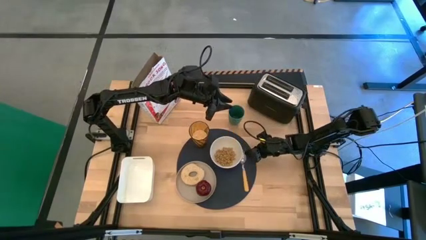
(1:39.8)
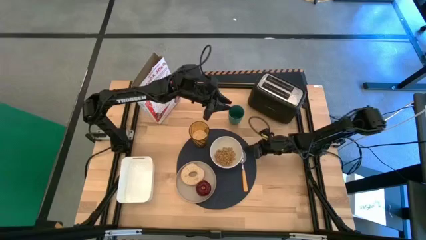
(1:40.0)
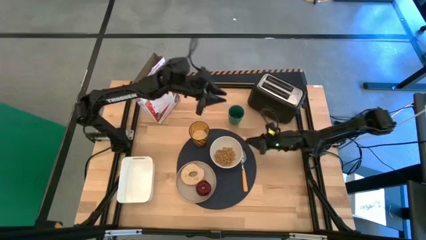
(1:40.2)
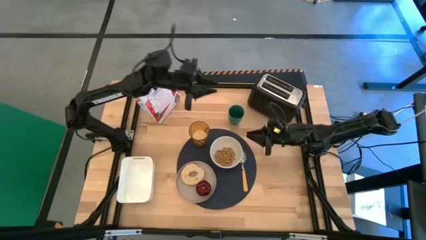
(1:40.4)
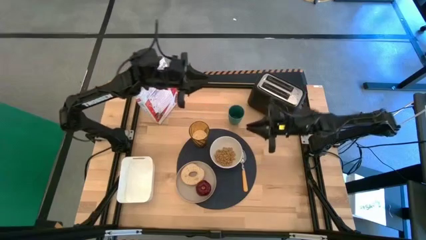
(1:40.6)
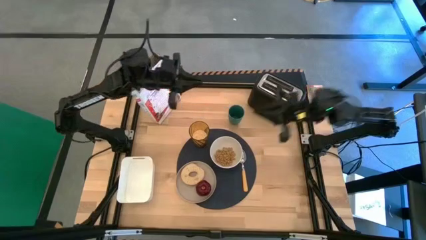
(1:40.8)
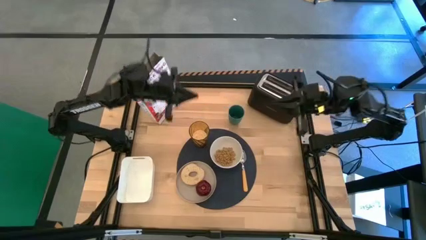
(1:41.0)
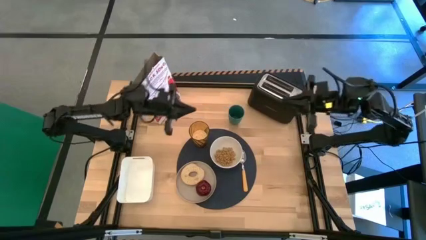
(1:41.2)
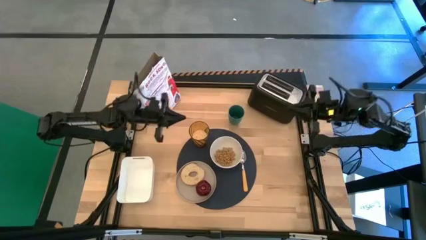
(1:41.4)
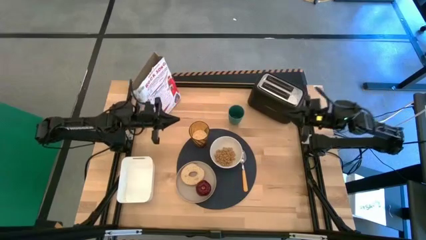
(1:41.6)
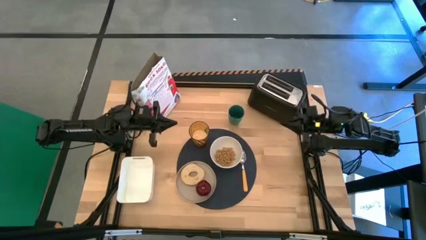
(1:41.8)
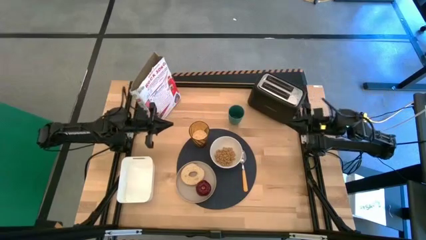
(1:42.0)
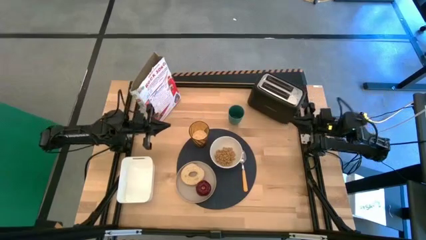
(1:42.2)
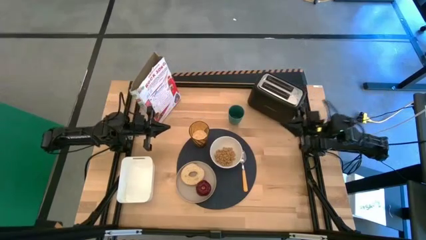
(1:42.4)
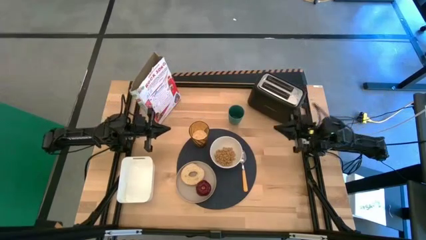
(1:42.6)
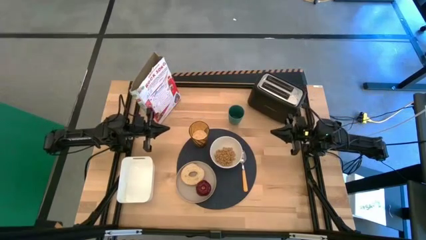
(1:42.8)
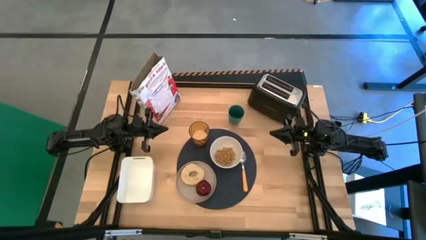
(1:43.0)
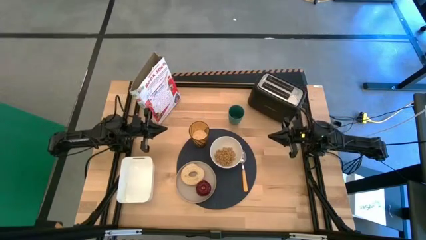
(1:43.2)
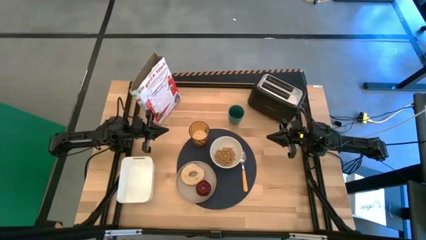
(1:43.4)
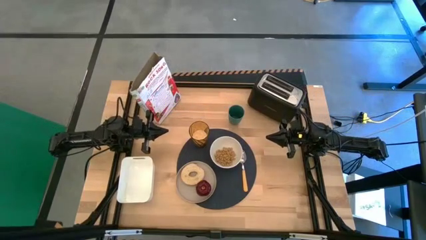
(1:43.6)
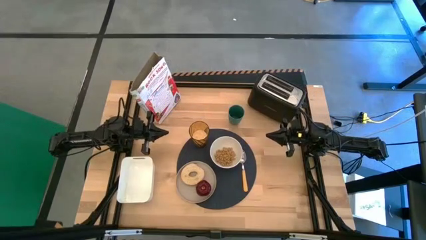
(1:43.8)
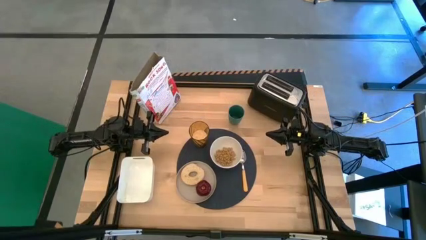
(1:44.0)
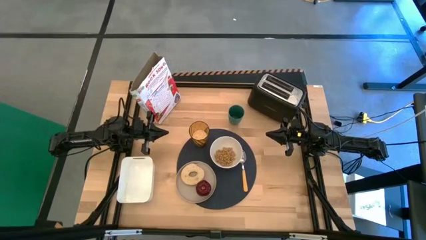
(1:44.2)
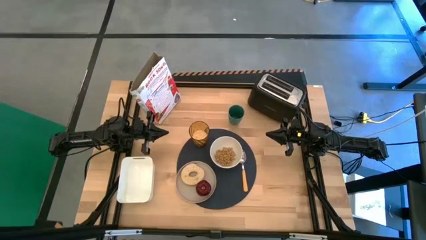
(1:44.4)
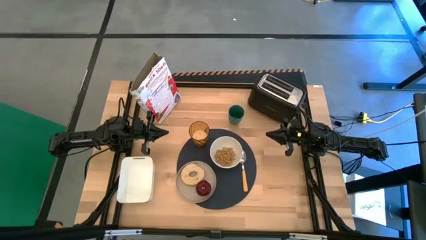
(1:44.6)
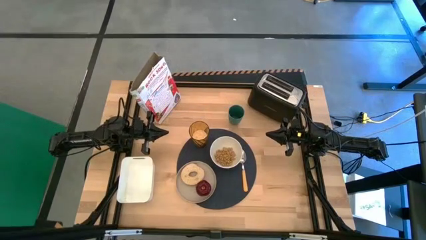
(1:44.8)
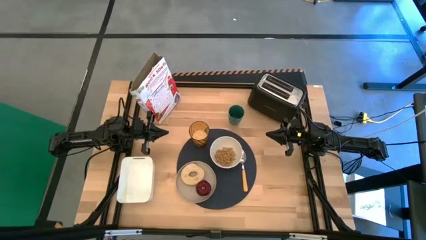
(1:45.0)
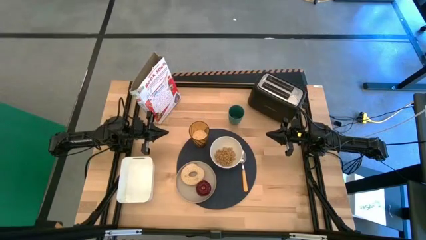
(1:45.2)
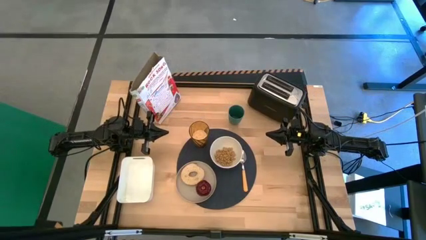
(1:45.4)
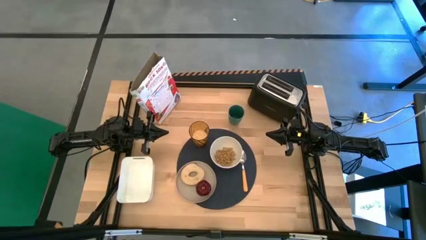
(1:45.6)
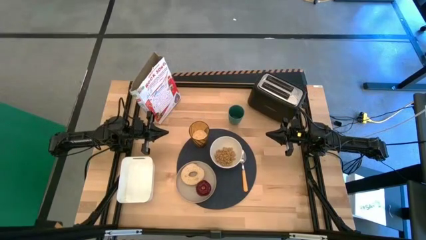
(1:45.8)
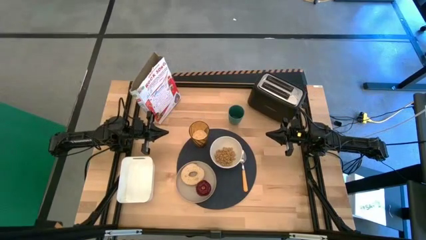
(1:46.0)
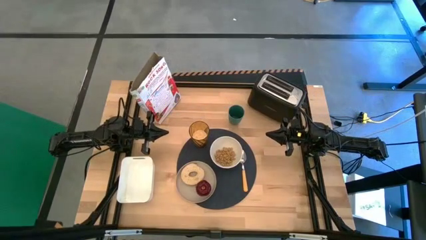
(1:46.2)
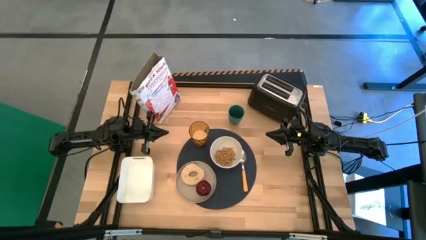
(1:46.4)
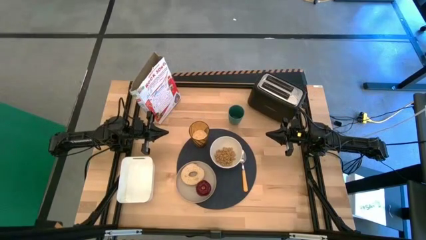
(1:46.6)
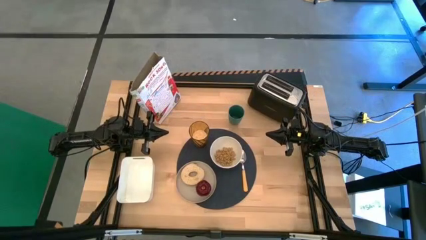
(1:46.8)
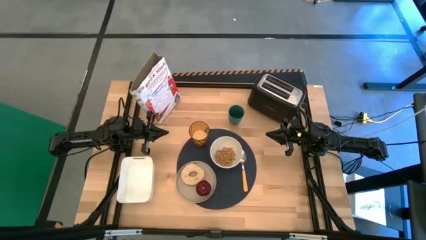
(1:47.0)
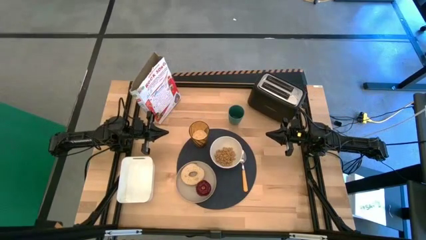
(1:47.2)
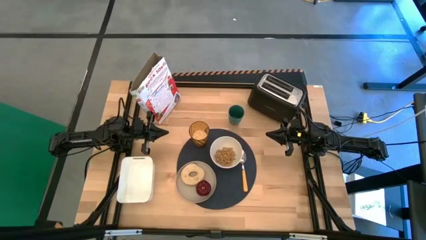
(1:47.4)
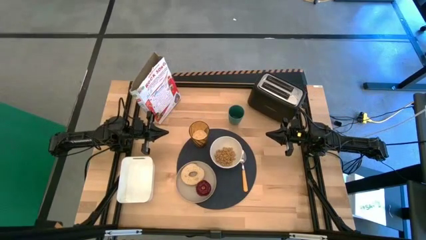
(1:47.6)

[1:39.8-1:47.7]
Task: Arrange a breakfast setting
Return to Home Position

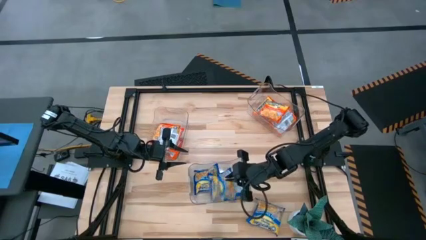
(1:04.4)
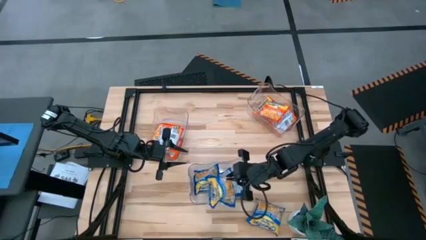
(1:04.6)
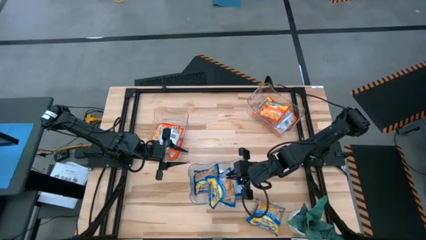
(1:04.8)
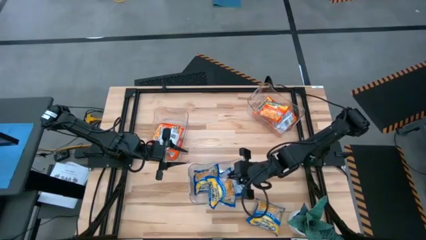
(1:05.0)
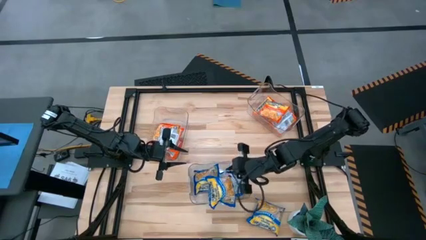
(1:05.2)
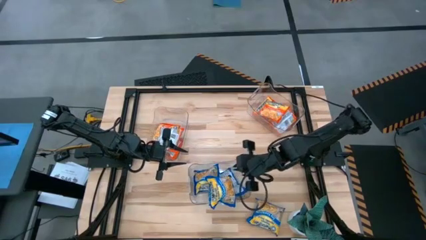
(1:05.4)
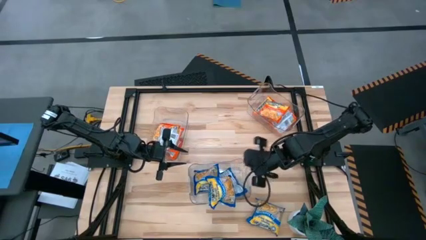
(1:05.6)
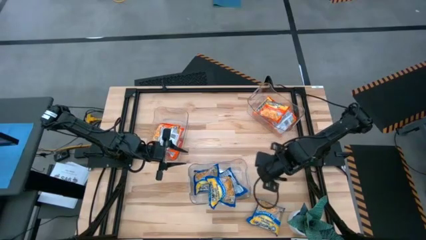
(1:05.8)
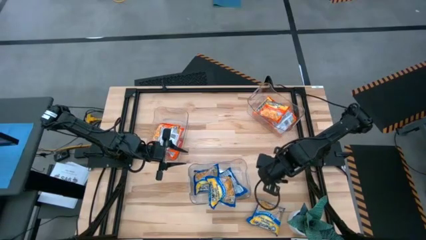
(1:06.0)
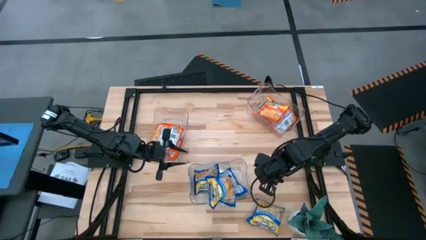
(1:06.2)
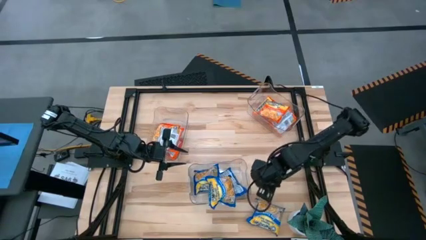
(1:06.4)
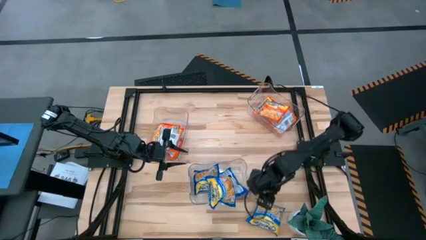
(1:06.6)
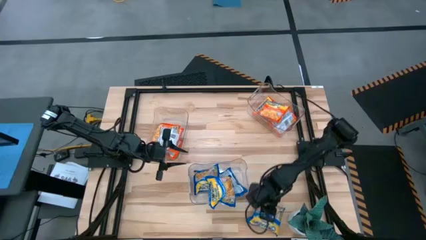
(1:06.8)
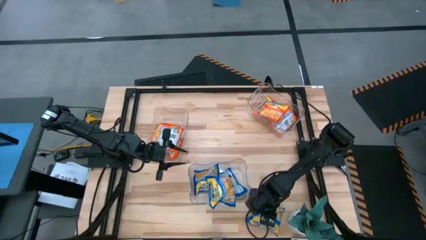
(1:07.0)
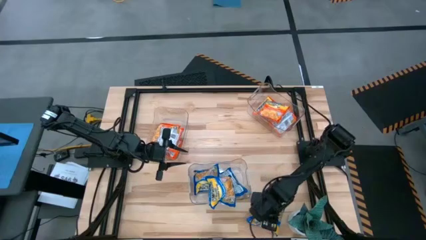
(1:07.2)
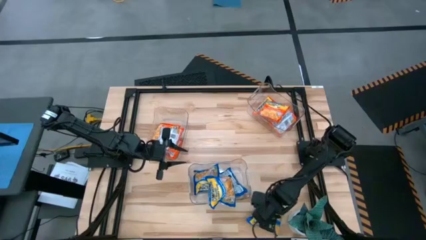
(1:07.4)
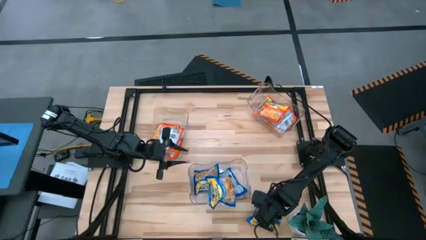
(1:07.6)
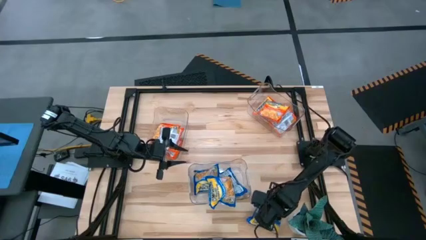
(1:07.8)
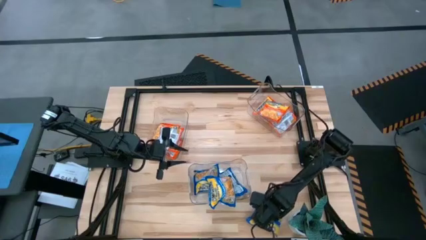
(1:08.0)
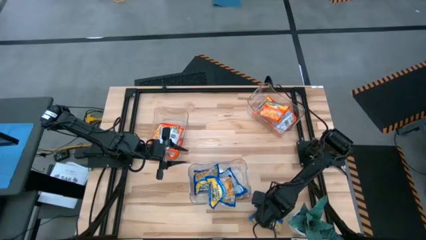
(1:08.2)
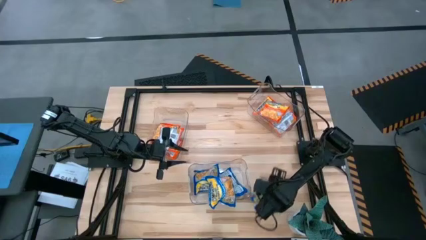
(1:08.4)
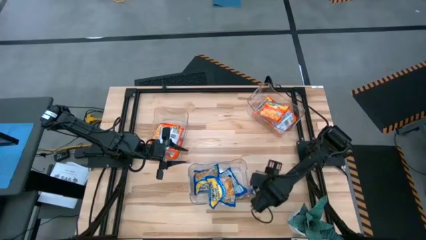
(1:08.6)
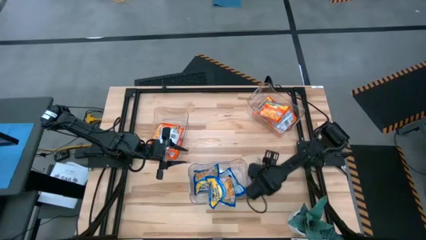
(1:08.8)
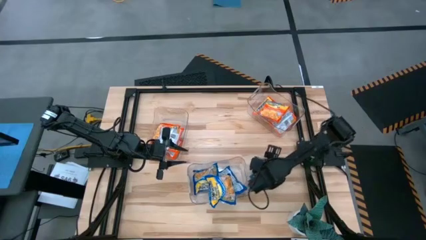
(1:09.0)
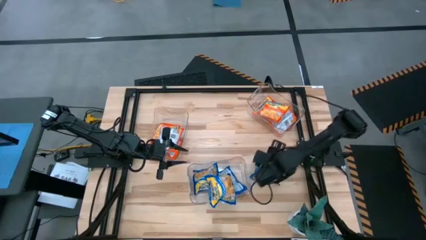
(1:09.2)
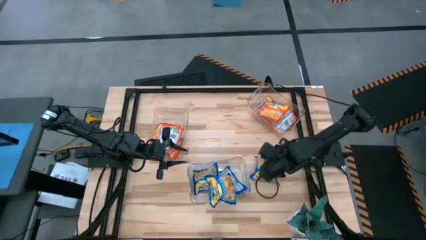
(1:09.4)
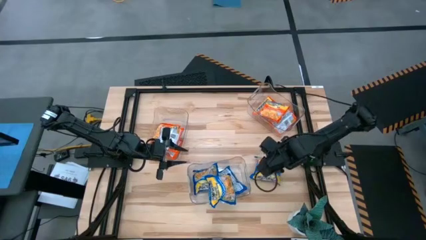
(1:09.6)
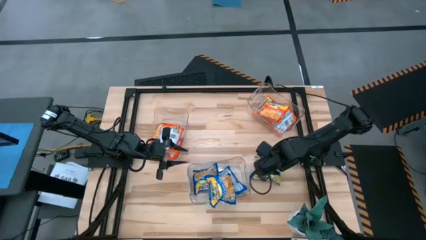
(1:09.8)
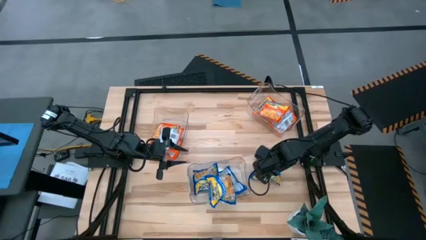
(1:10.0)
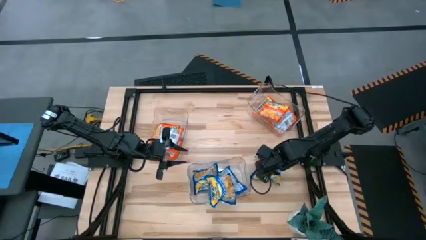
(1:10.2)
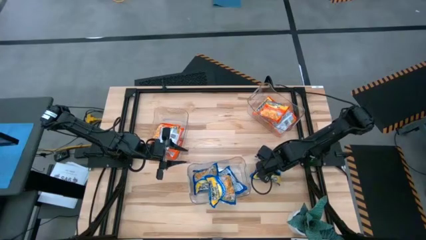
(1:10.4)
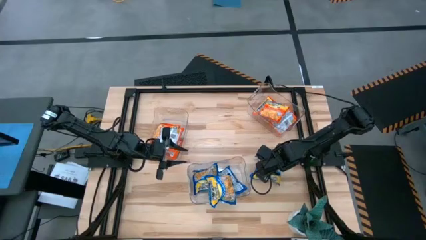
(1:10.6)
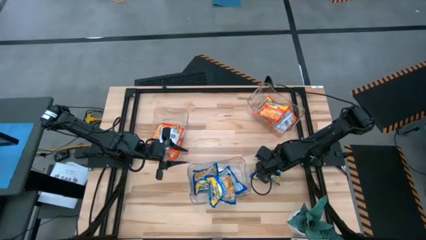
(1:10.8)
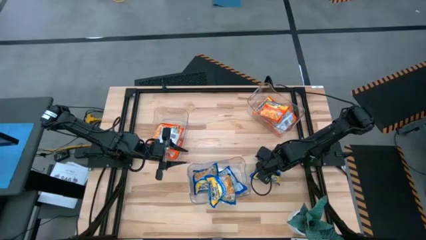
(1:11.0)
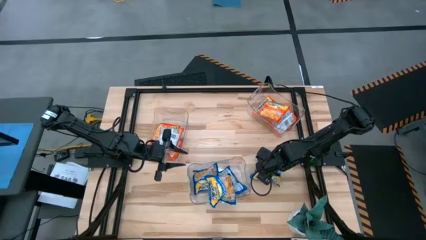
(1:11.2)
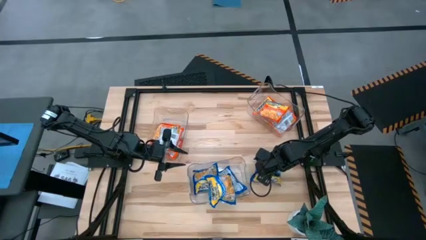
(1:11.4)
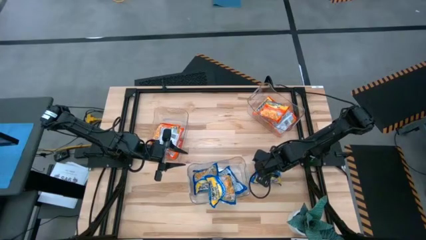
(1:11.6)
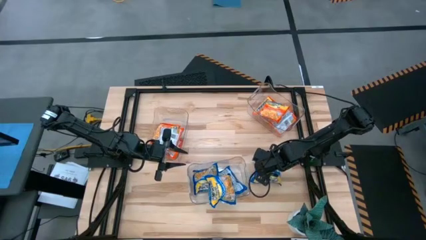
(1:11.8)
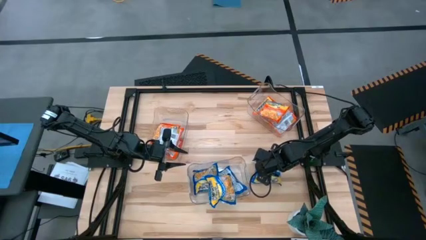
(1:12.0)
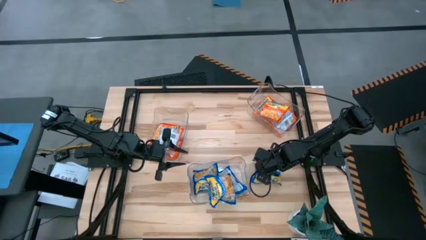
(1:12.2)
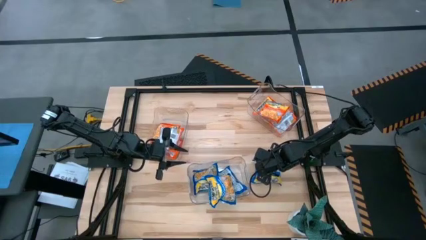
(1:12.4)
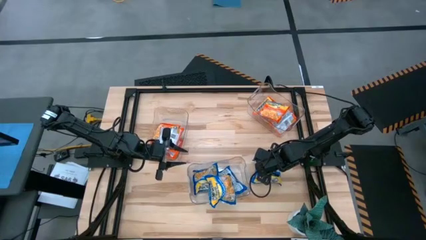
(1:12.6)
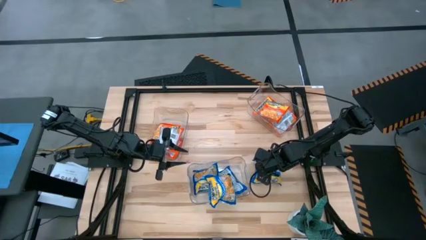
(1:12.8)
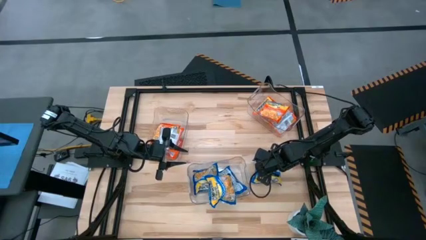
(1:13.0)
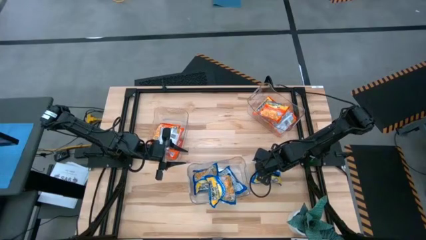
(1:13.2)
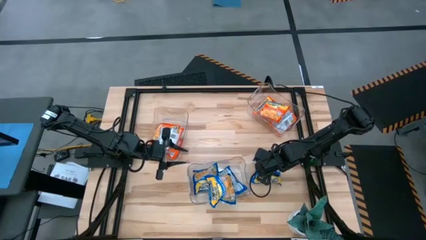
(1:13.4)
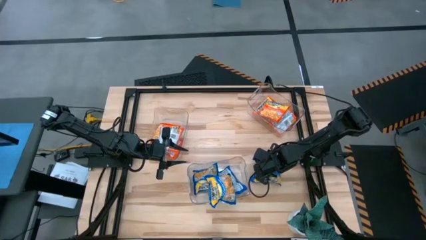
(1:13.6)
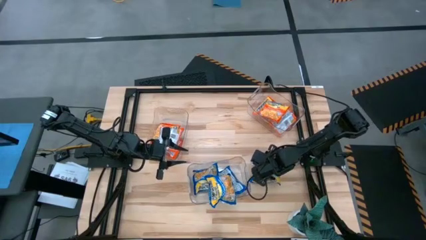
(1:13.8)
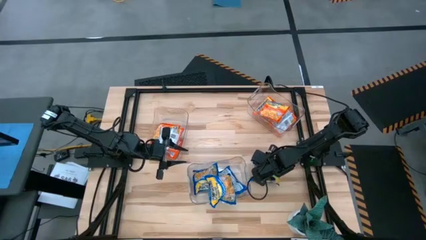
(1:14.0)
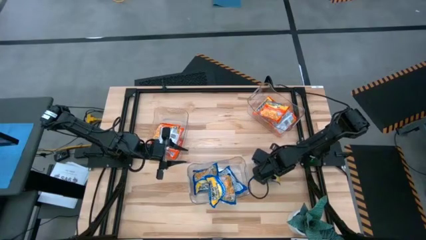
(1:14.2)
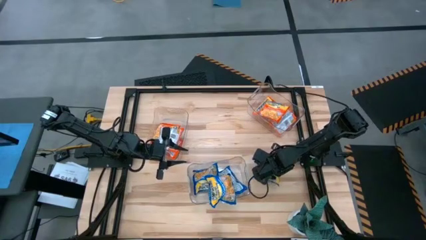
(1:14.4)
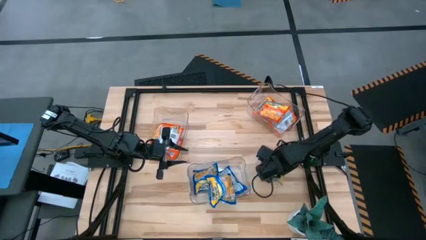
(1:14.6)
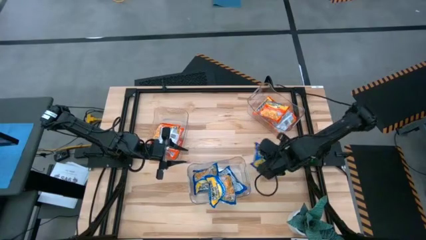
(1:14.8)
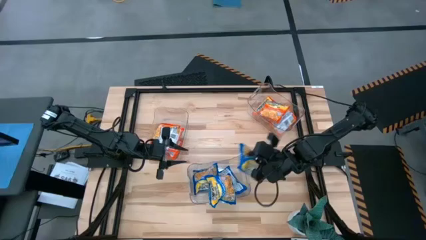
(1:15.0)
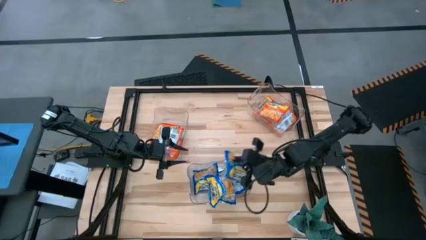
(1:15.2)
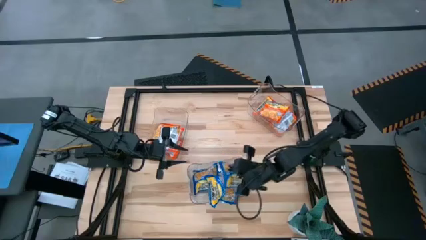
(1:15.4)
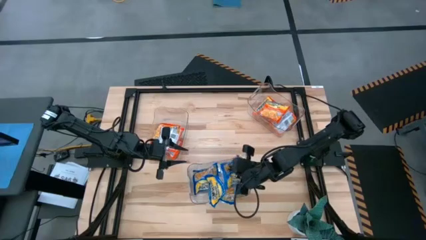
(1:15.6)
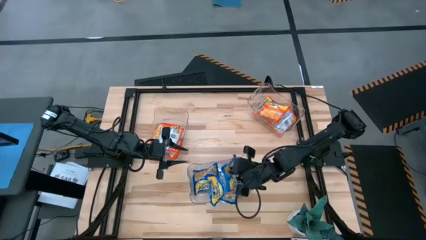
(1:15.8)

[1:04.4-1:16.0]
Task: Sort Maruchan noodles
Put the blue noodle pack into the bottom transparent bin
